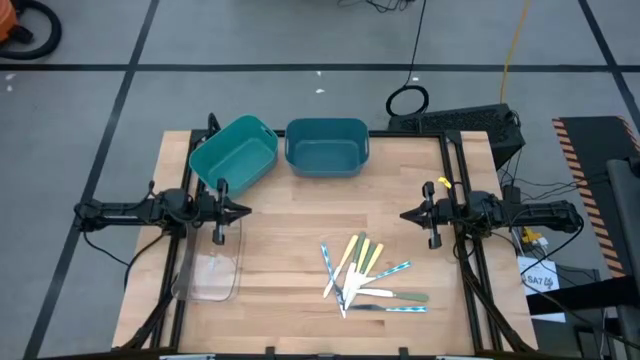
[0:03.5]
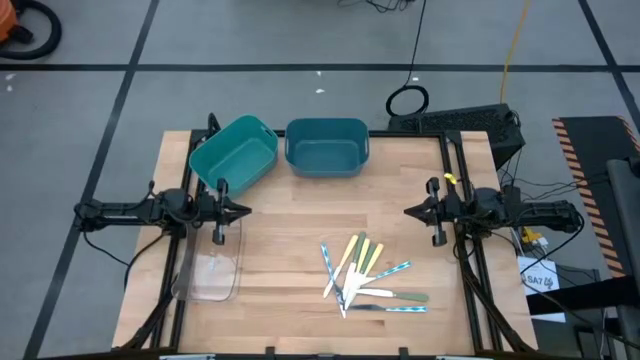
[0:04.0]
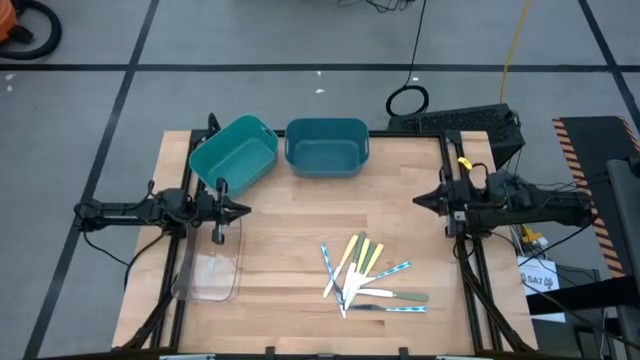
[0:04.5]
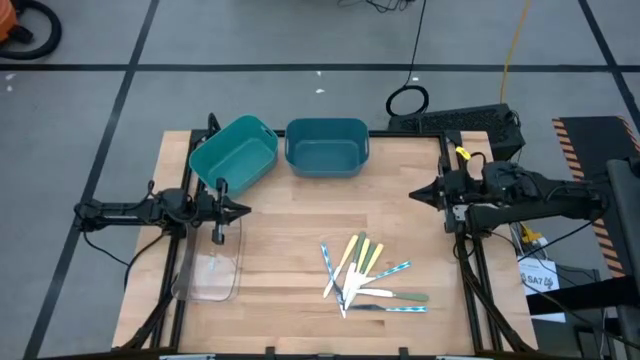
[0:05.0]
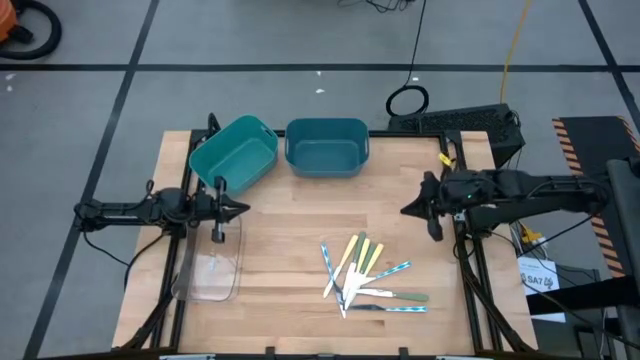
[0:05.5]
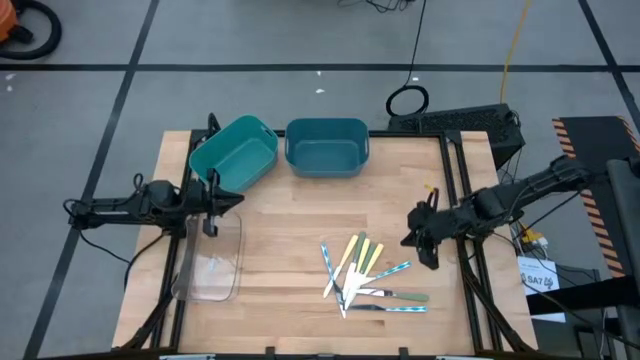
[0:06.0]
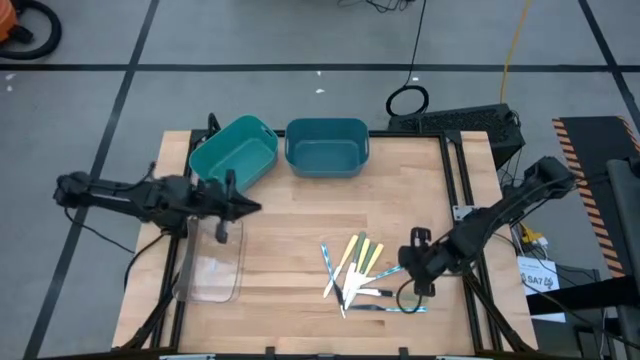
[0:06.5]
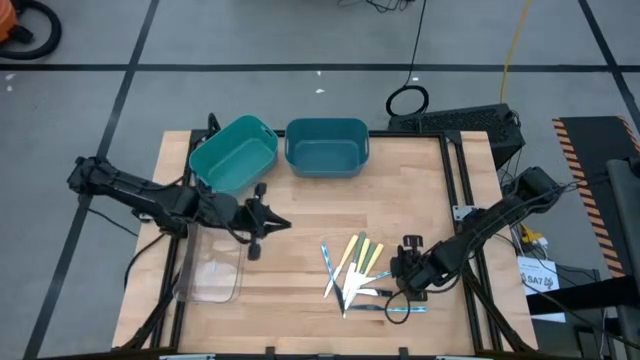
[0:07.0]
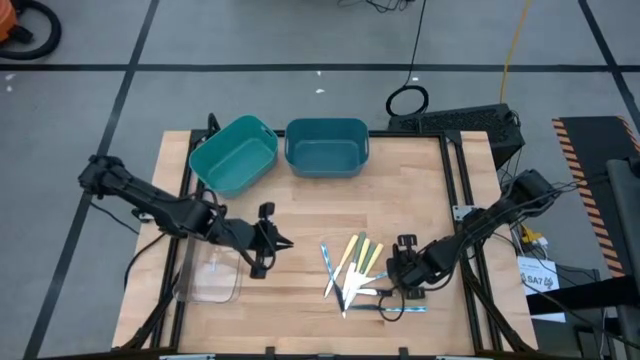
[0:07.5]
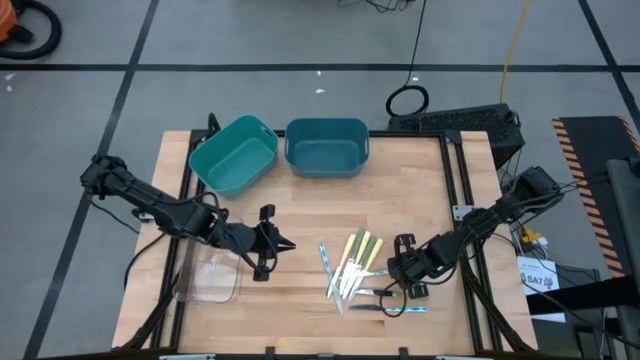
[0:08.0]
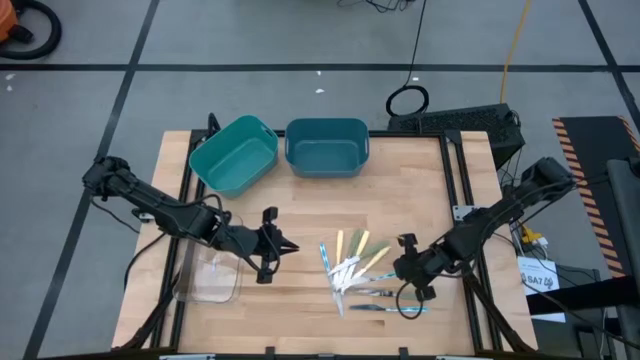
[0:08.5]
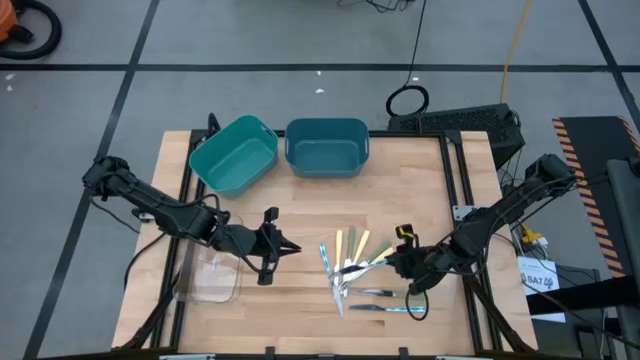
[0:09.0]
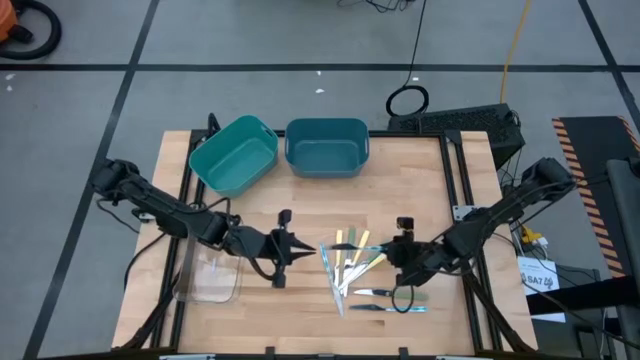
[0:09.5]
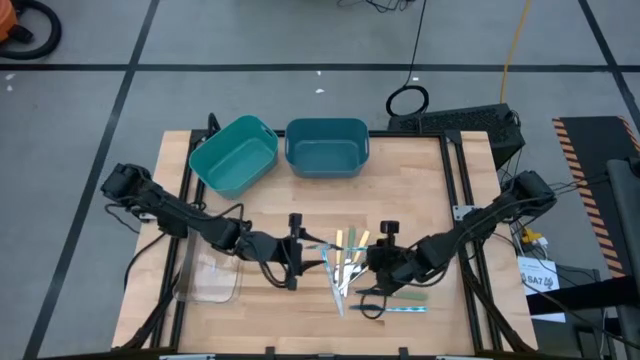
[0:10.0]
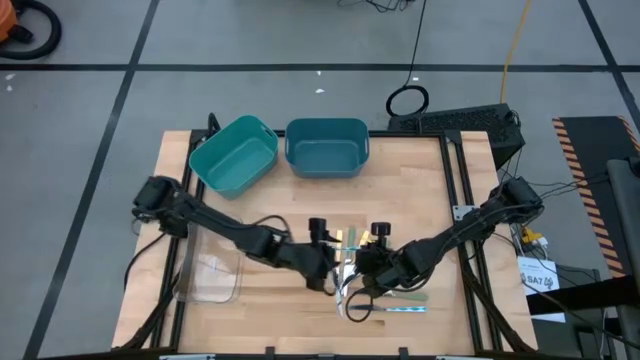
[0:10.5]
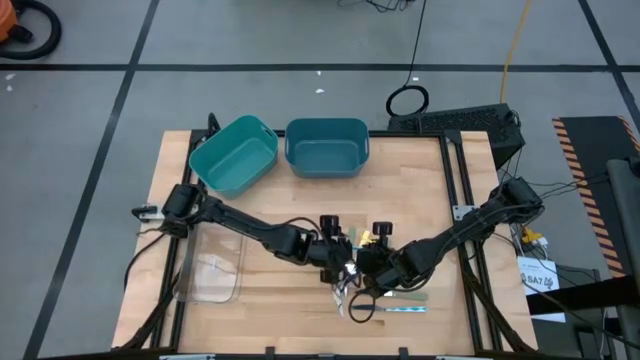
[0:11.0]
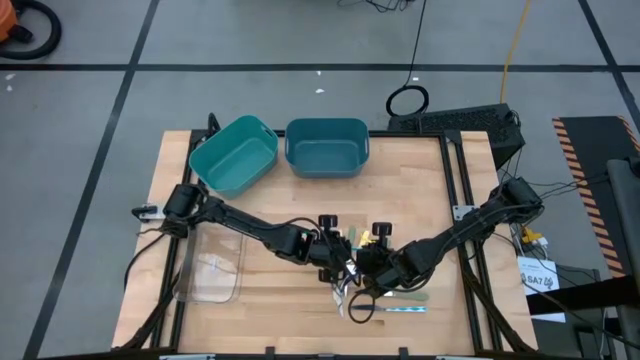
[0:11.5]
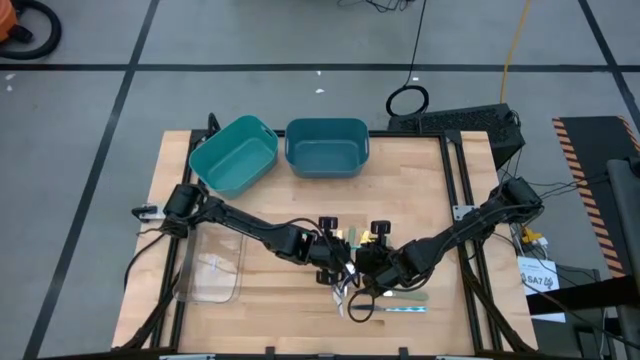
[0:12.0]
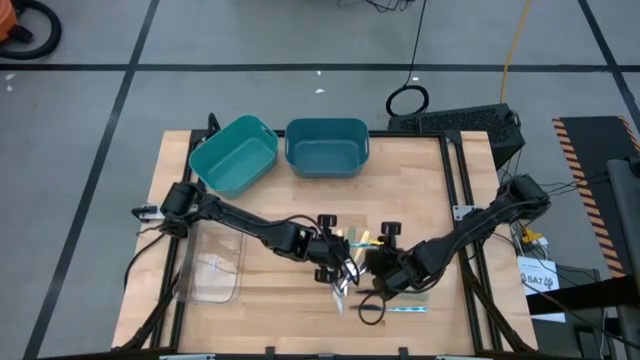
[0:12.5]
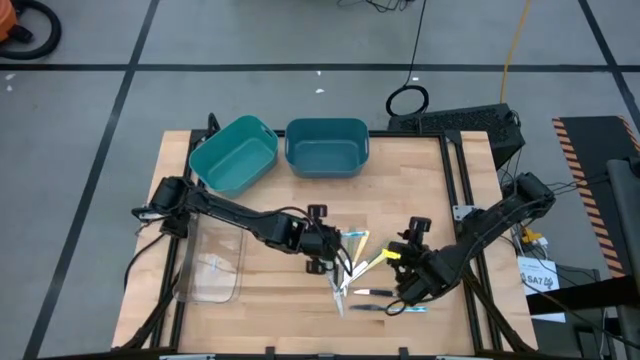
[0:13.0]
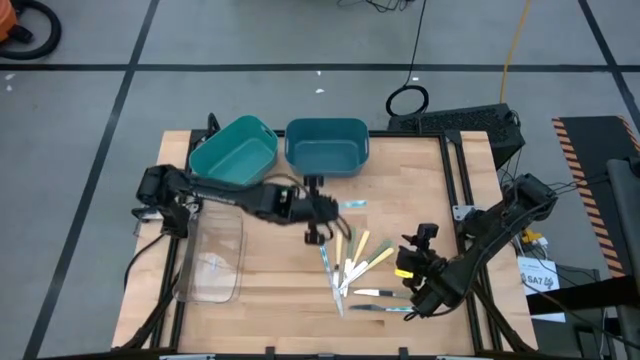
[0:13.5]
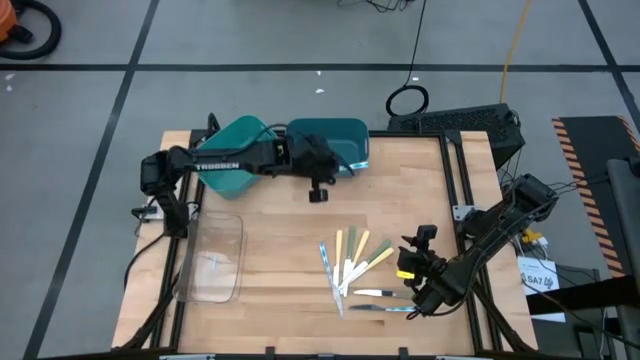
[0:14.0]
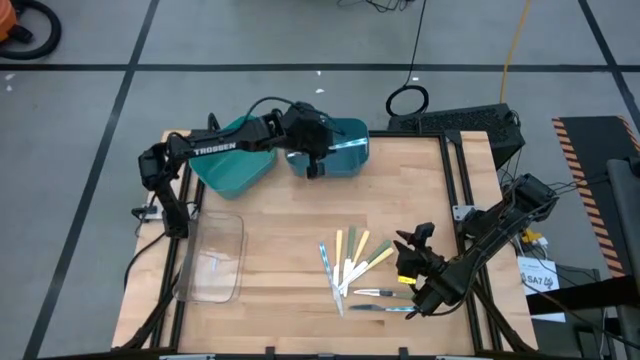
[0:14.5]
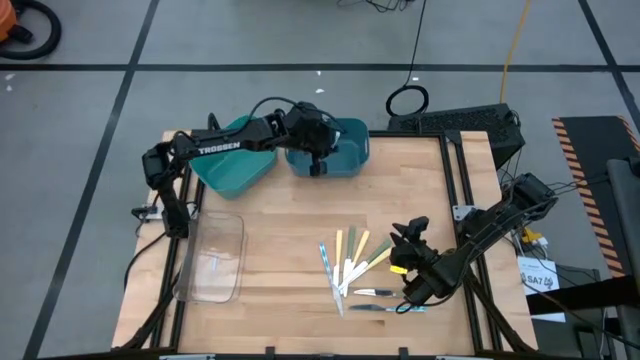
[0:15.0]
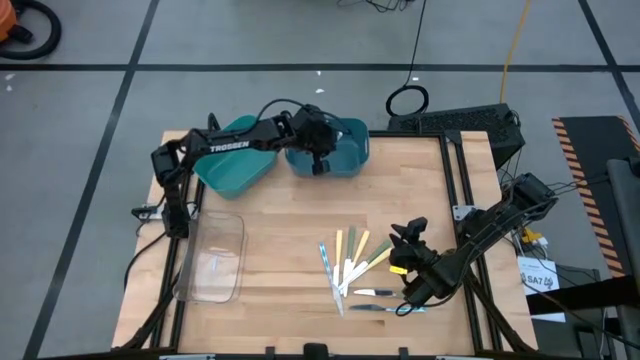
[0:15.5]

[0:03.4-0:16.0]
Task: Sort silverware by color (type)
Put the top right blue table knife into the blue bin

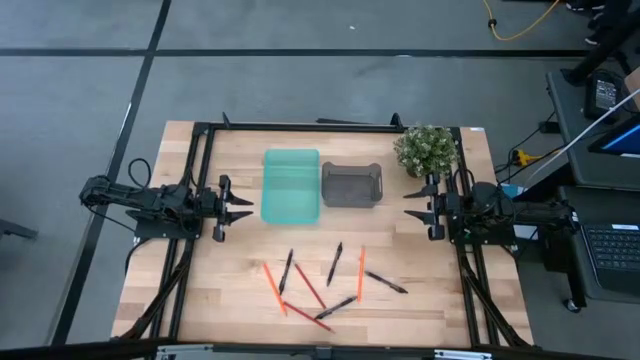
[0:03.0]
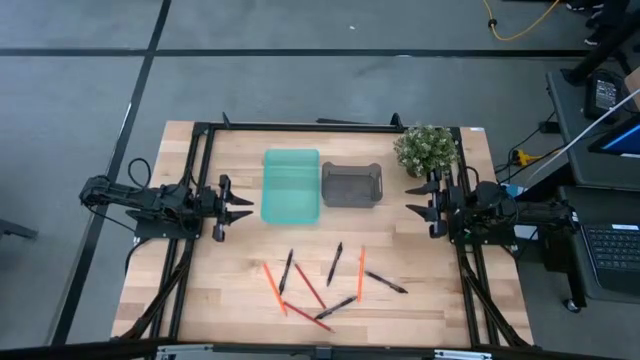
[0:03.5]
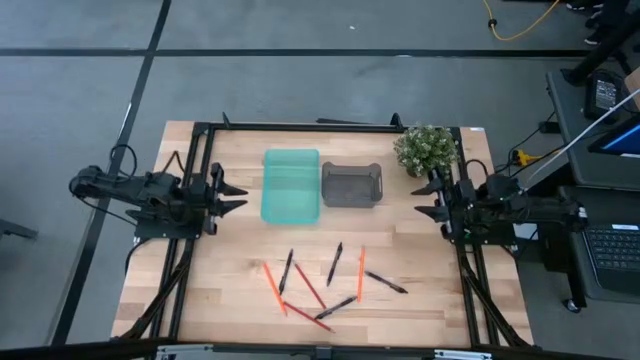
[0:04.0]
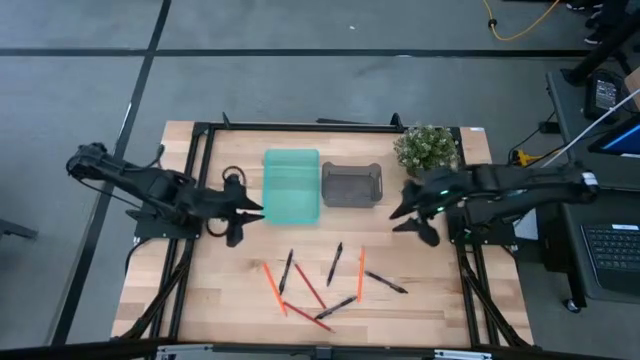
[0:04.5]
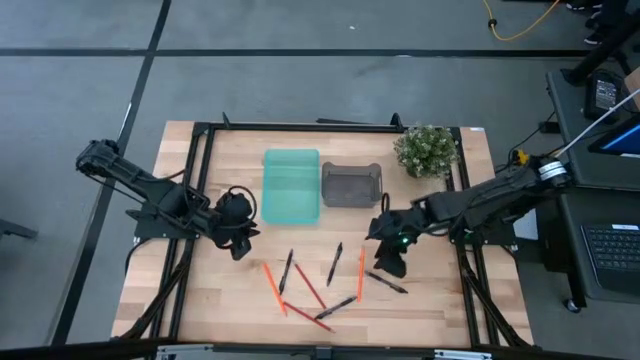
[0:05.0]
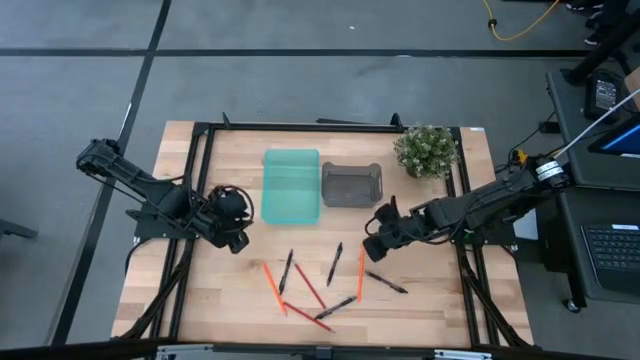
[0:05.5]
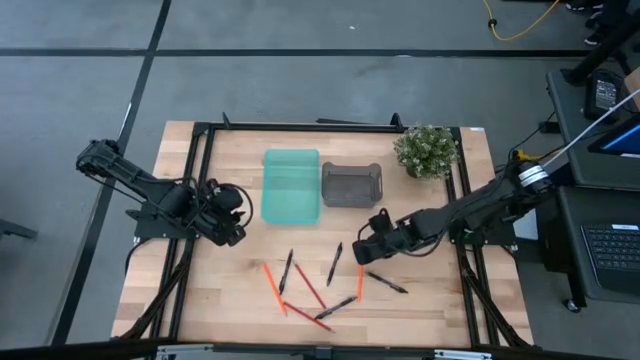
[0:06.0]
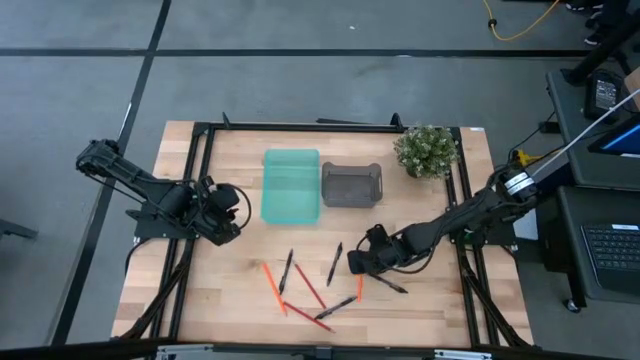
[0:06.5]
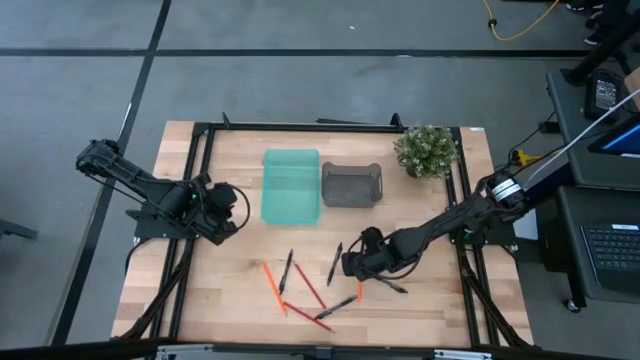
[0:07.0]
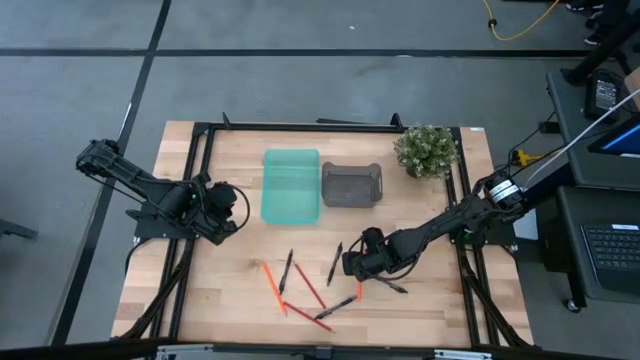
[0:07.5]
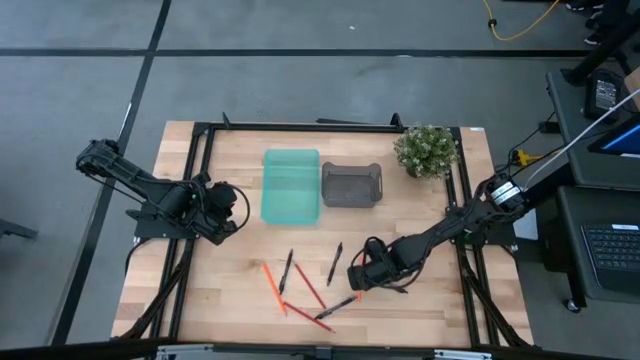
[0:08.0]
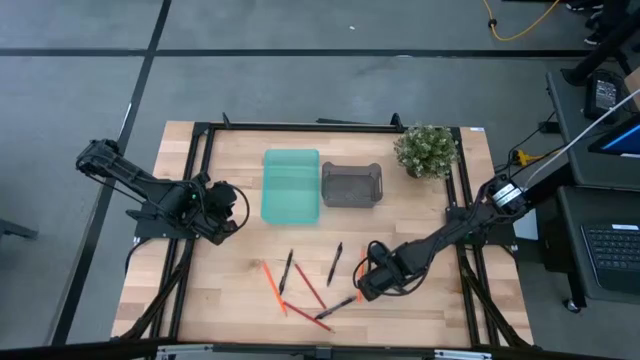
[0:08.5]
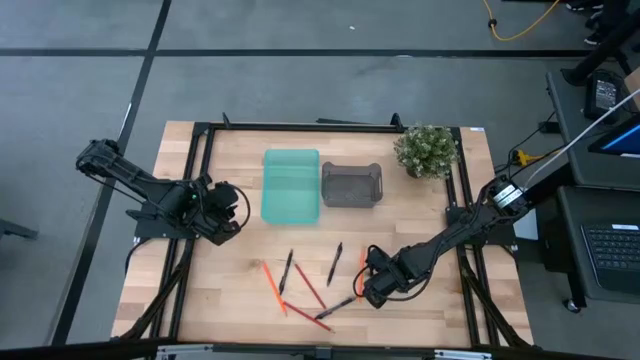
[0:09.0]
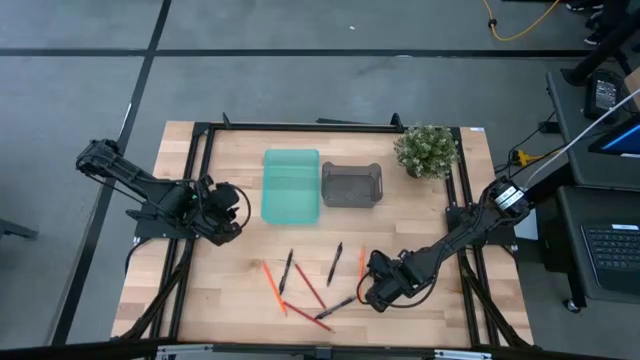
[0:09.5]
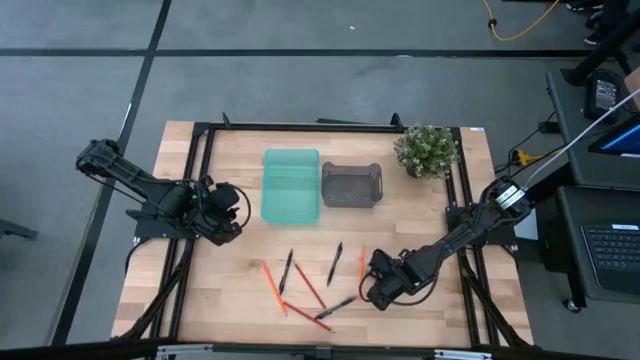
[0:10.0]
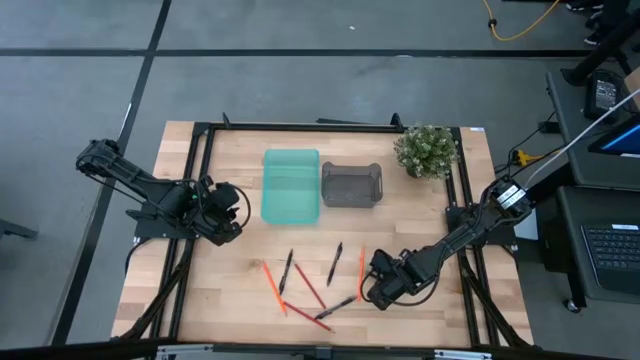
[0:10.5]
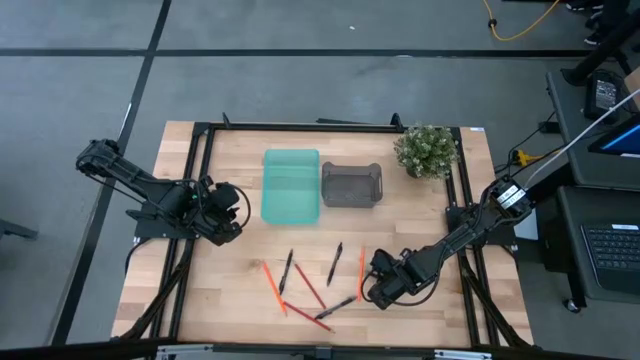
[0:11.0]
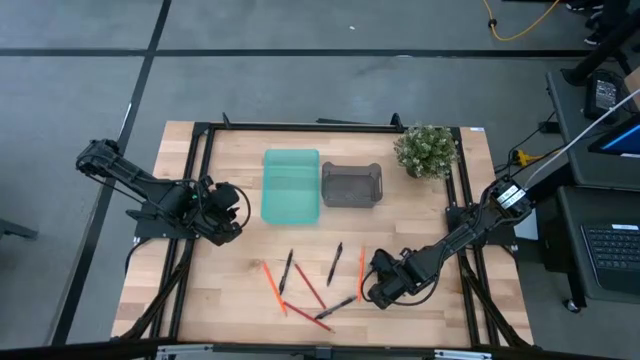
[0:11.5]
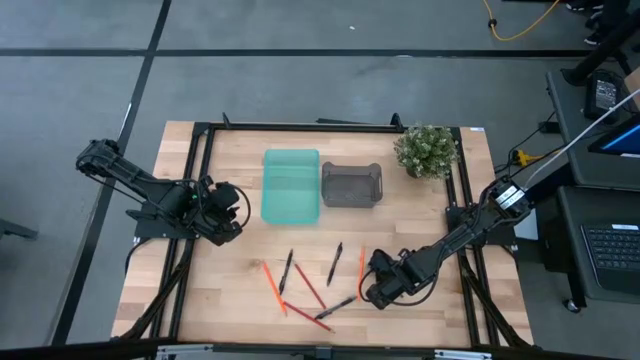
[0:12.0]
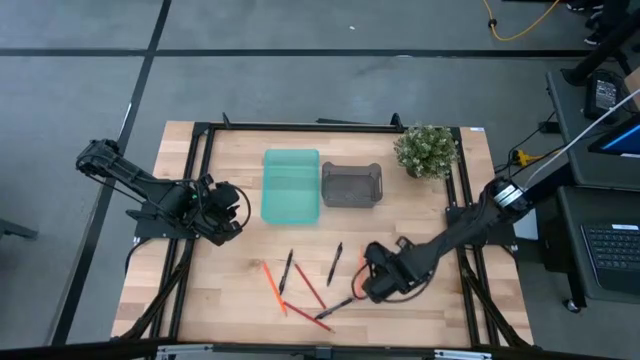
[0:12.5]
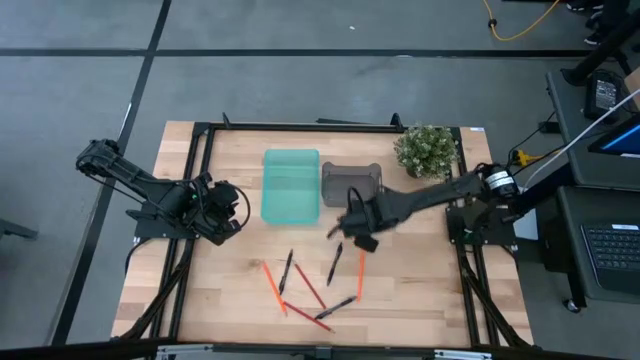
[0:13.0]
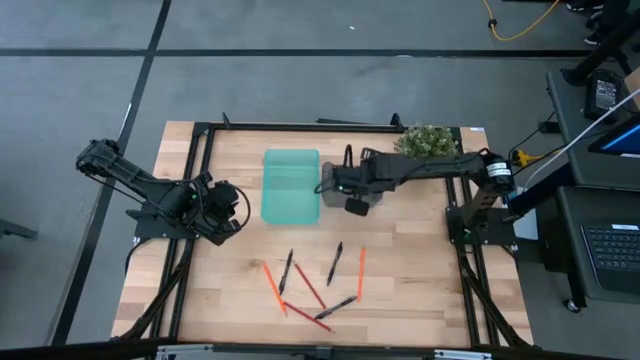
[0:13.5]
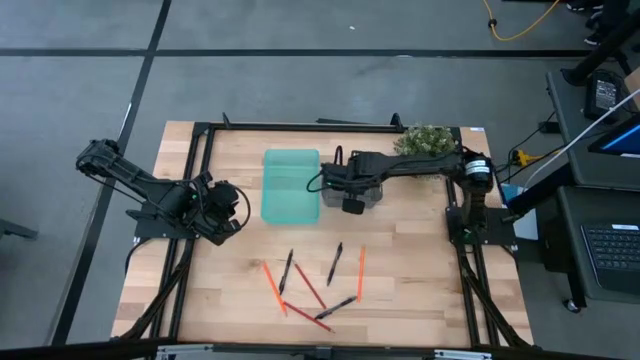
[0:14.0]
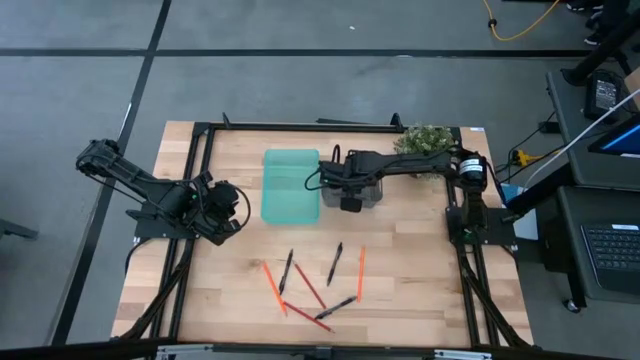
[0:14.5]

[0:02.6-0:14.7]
Task: Sort pens & pencils
Put the black pen into the black bin
